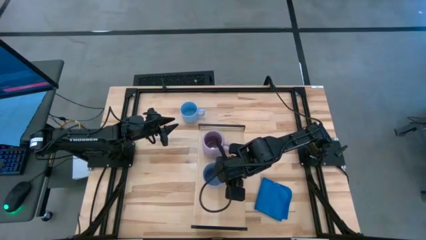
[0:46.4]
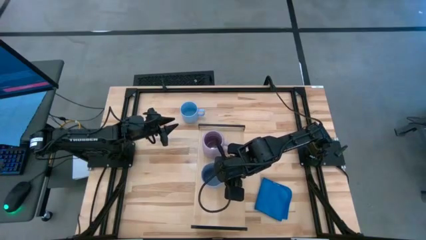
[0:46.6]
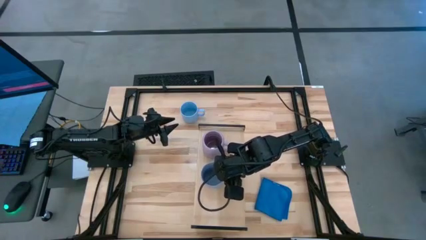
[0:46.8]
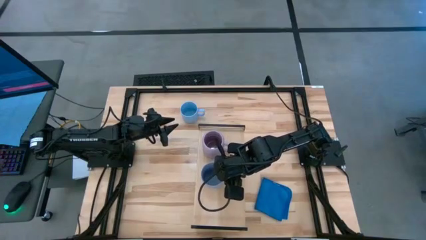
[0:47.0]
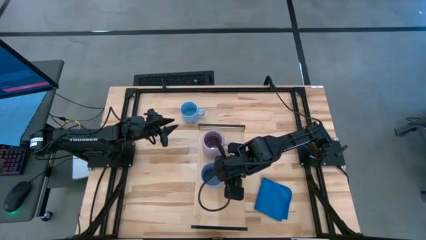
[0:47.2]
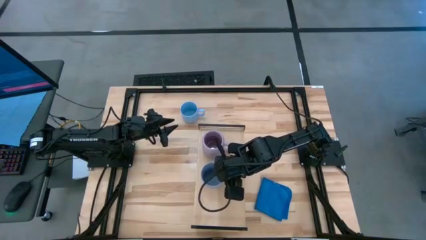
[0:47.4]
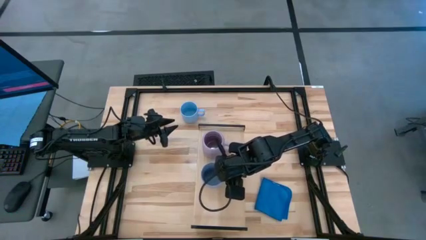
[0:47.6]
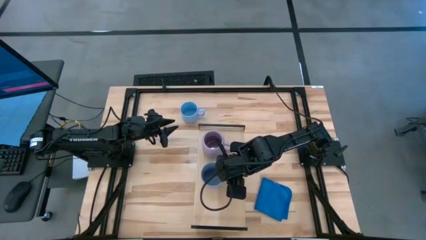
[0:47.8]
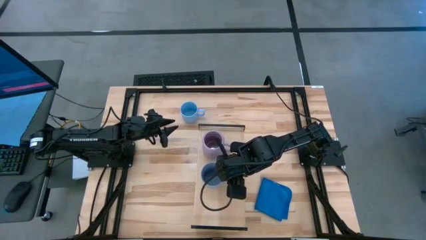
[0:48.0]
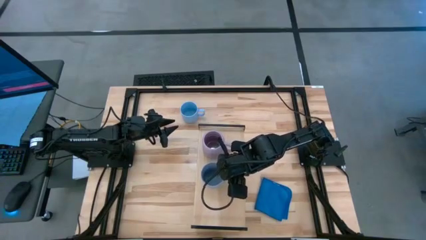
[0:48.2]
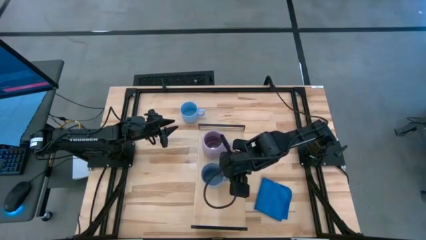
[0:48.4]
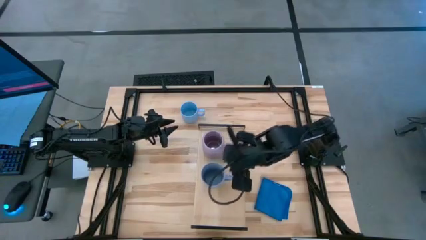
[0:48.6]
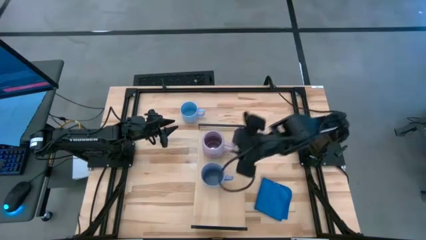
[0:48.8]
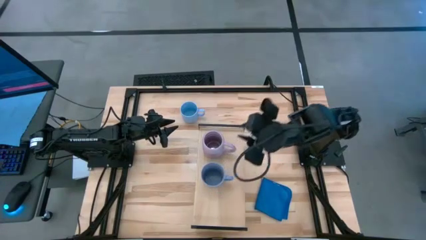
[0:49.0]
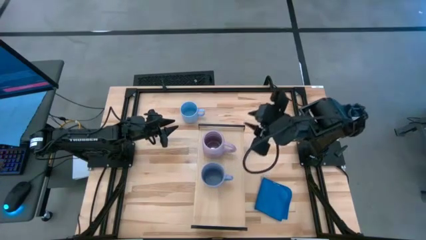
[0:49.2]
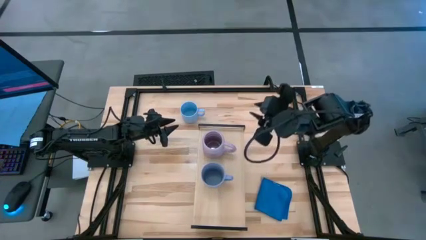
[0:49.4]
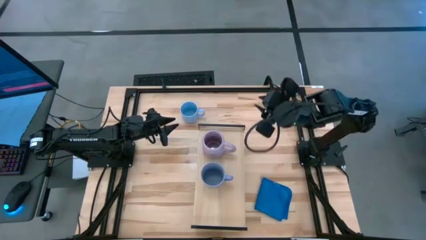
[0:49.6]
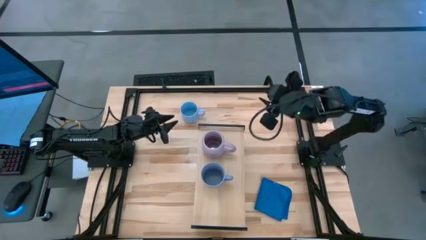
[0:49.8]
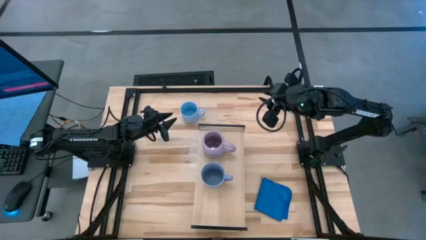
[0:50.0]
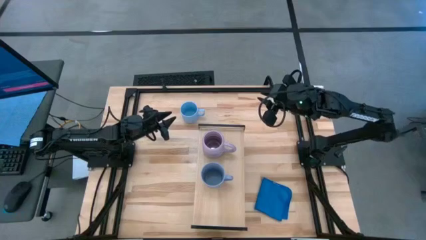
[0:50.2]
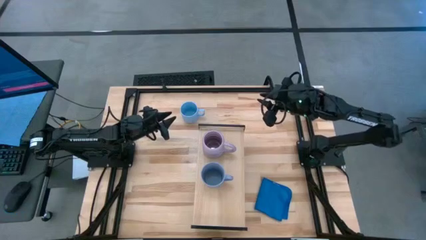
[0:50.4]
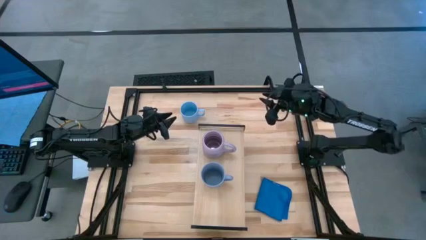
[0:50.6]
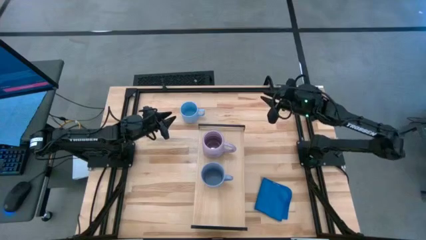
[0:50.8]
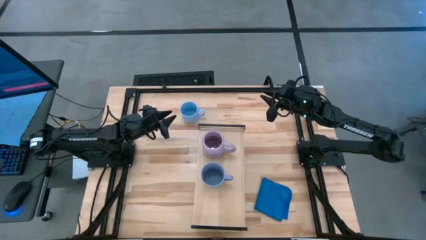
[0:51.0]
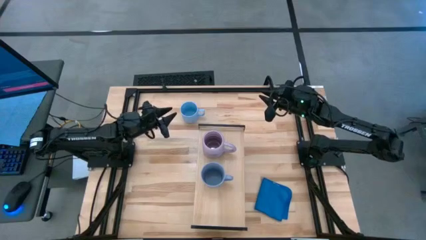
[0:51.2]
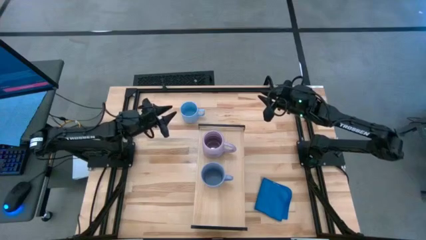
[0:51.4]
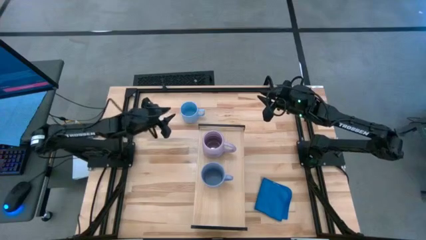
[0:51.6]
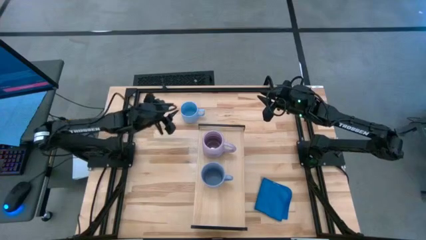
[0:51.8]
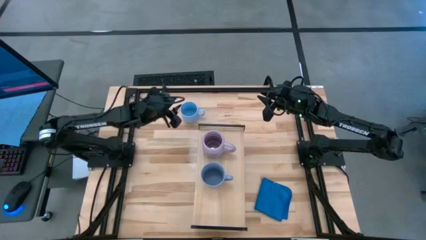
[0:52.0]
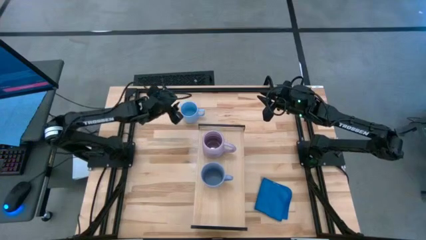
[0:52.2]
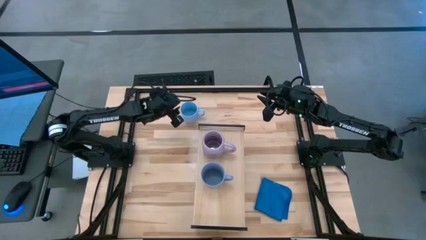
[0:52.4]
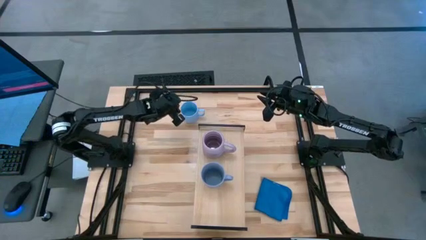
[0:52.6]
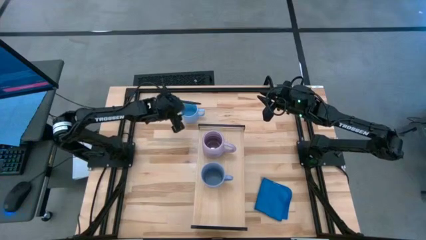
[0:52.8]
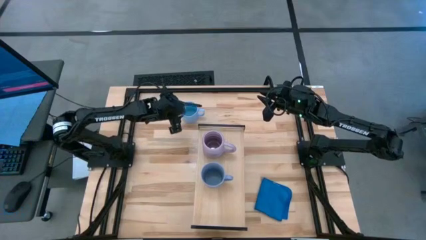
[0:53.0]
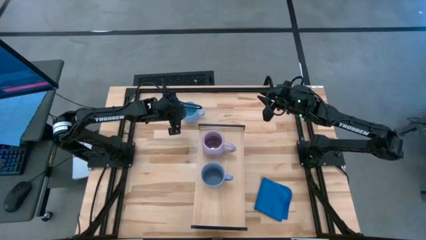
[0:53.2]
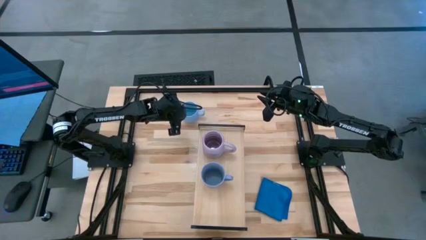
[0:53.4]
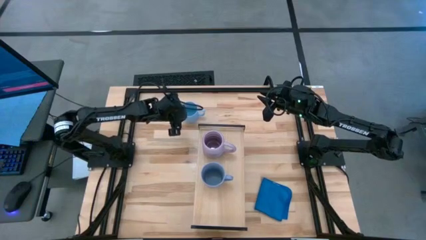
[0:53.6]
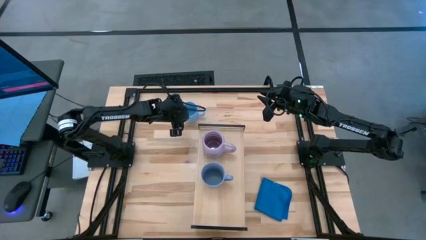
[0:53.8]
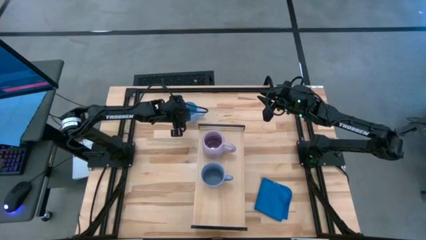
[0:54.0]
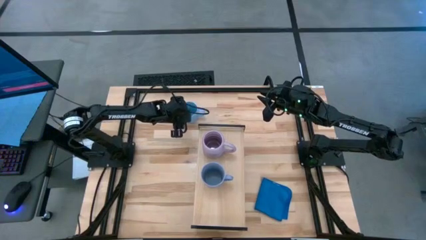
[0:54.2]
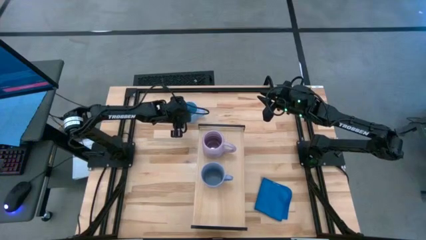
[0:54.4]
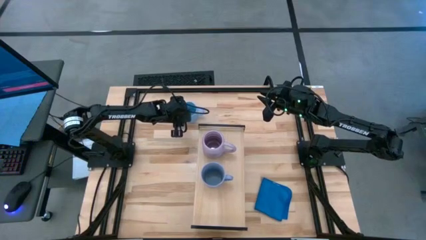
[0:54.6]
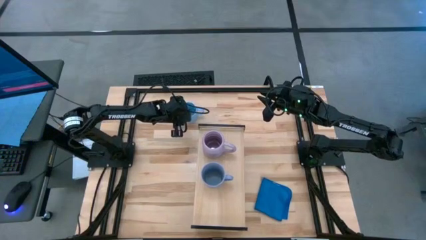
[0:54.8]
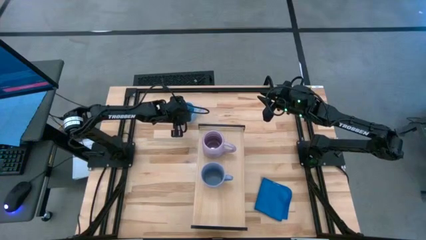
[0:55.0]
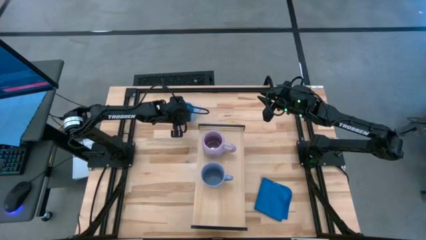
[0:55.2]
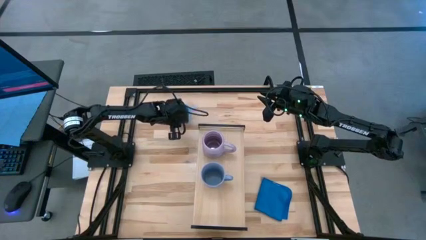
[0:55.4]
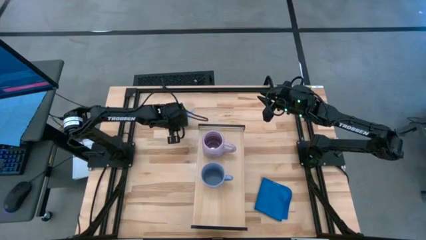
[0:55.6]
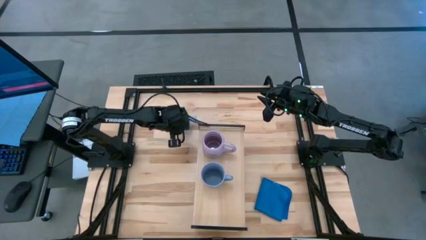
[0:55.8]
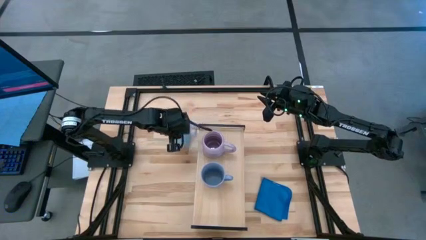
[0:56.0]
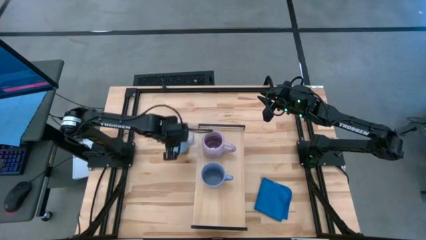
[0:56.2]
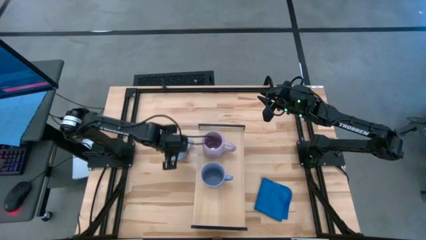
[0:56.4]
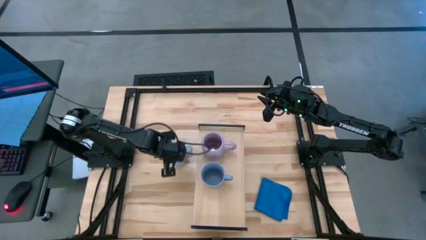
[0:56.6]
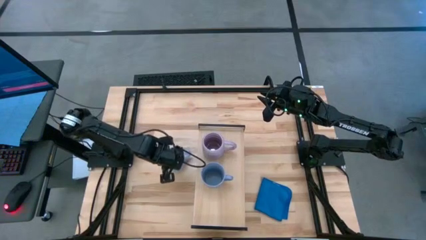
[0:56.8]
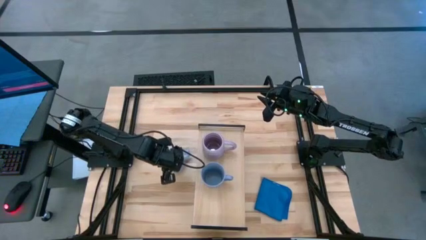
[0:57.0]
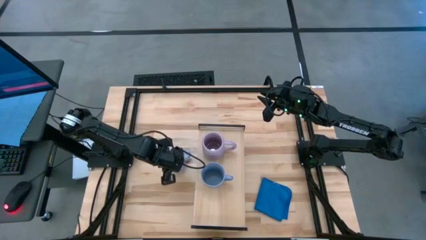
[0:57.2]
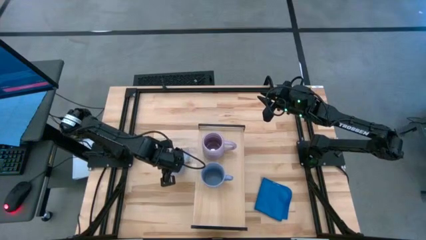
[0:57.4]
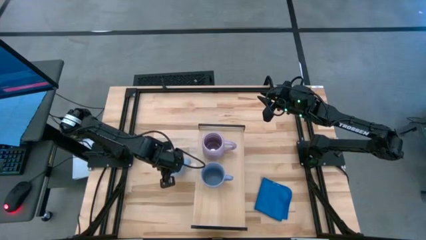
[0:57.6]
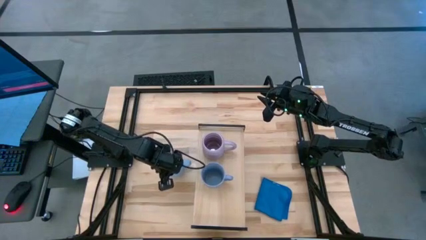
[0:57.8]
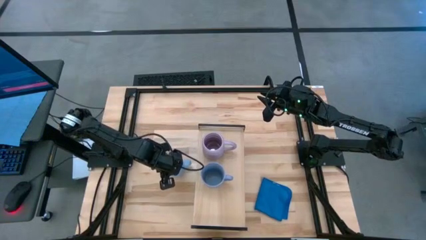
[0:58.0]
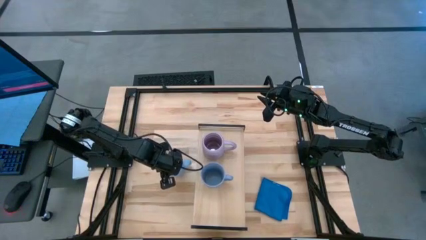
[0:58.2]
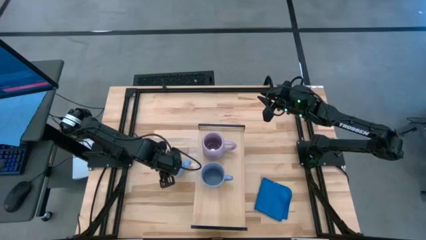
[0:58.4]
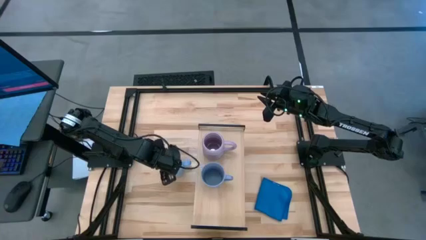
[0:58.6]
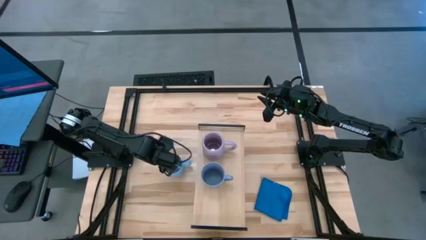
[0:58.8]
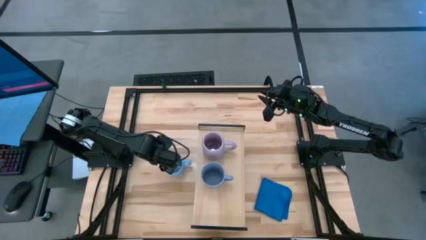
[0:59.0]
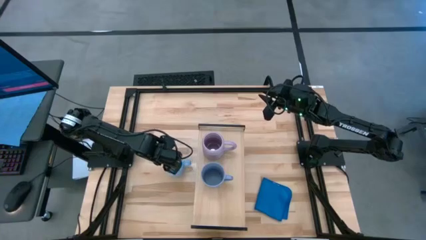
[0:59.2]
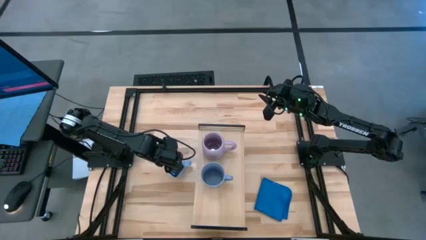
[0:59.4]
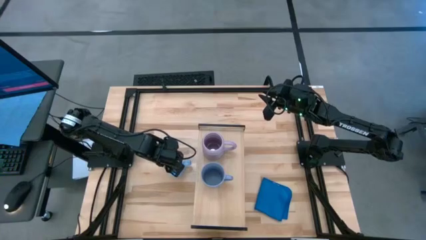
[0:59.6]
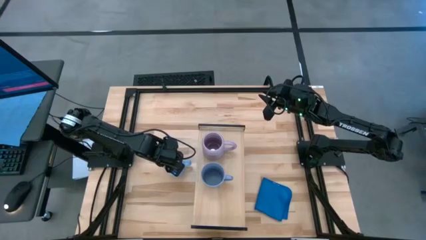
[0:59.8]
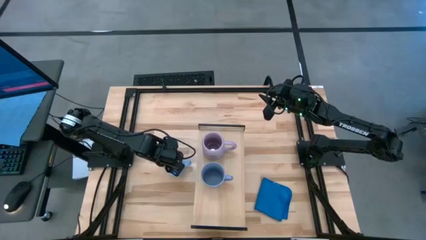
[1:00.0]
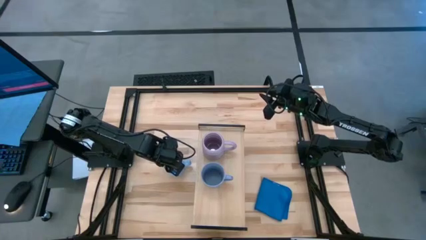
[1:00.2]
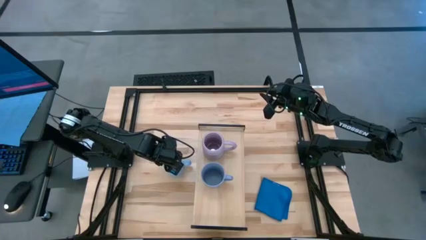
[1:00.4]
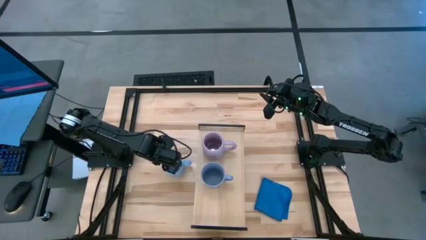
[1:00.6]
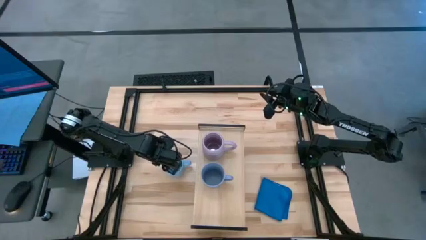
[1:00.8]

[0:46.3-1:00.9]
Task: Stack small to large cups/mugs on shelf
Put the light blue mug on the shelf
